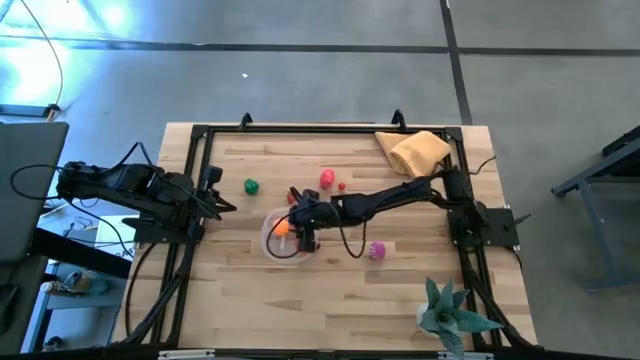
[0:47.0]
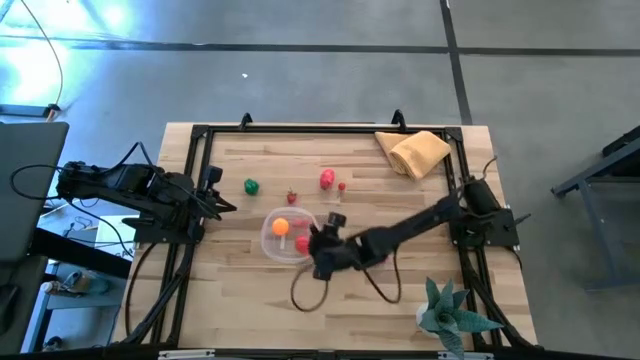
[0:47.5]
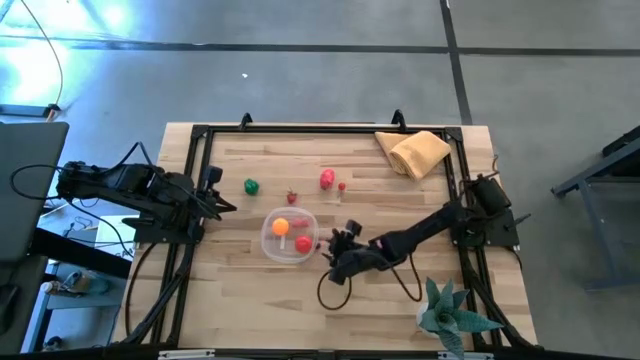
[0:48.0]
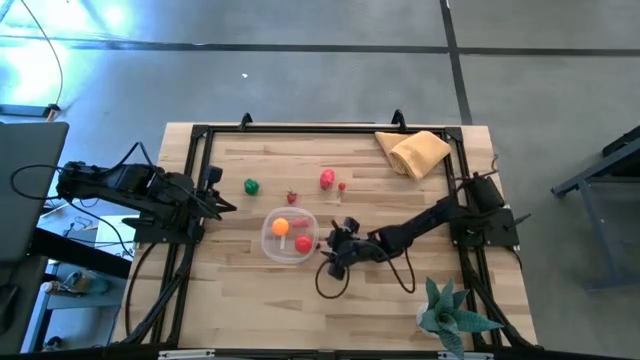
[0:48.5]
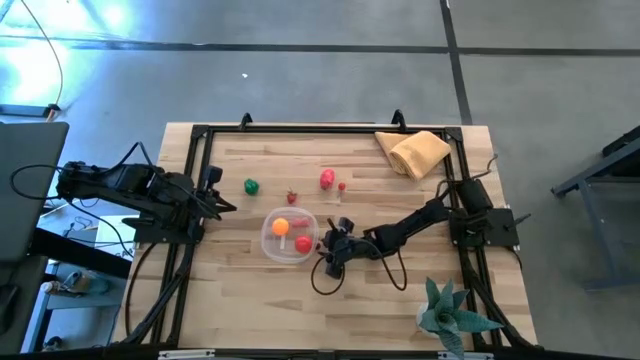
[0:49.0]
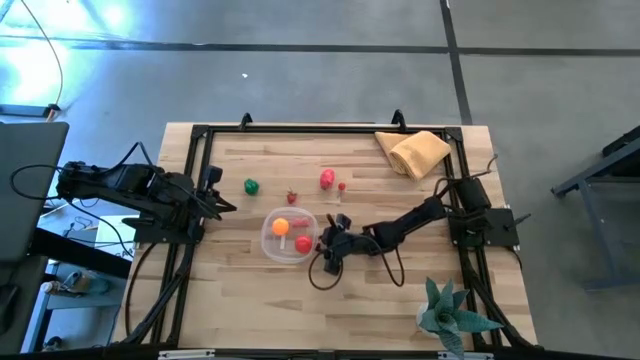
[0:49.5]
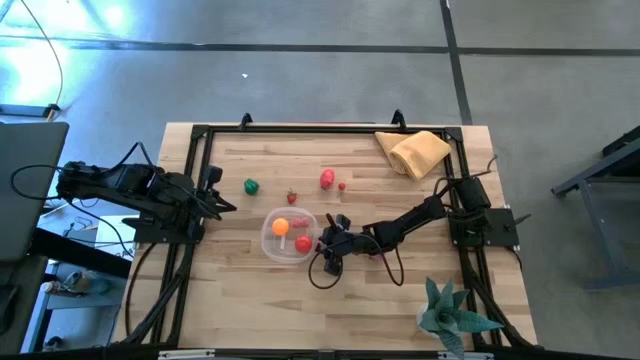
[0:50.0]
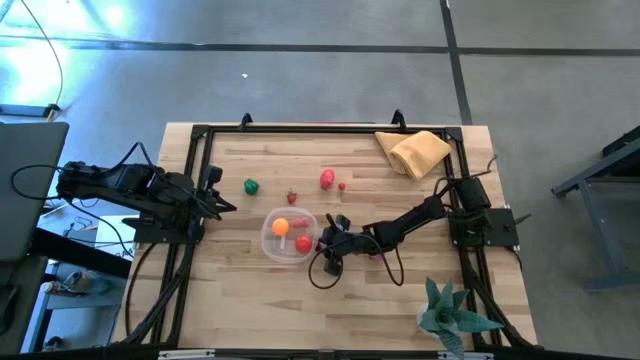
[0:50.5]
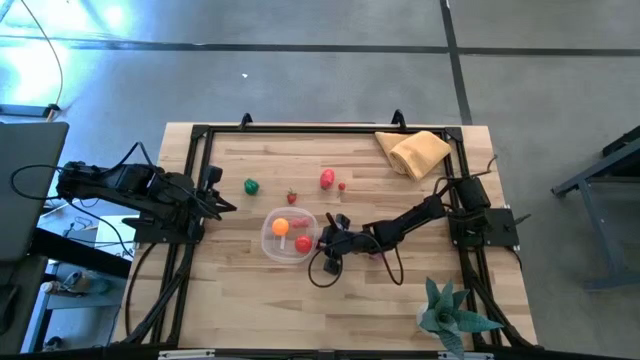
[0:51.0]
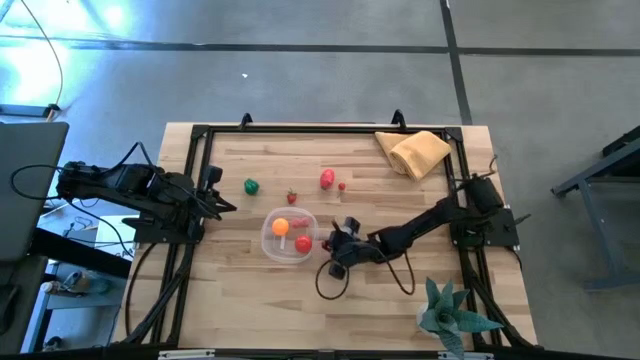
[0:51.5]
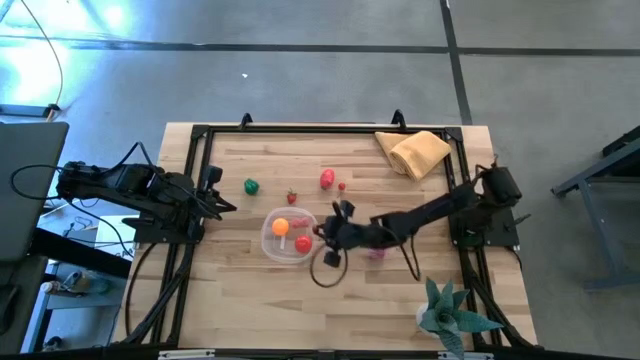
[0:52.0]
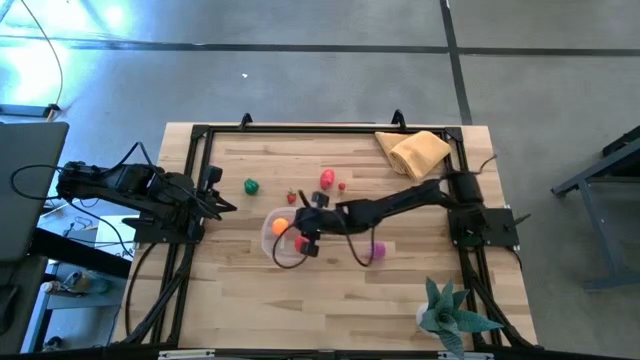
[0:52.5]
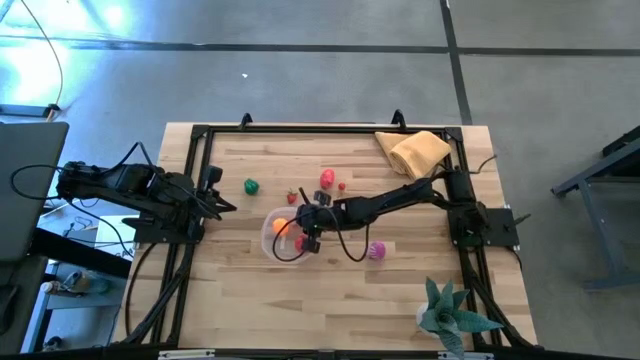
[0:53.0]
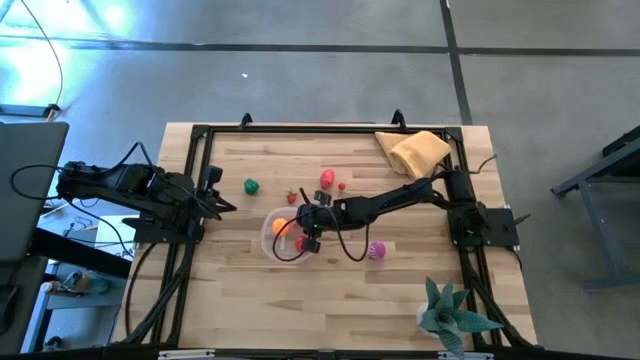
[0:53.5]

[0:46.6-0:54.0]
Task: Pick and placing Produce into tupperware
Put the bottom red cherry into the transparent container

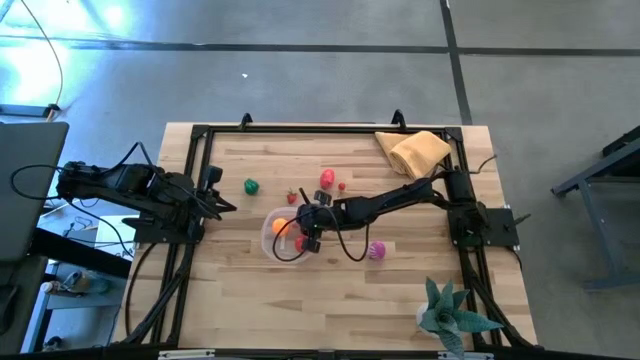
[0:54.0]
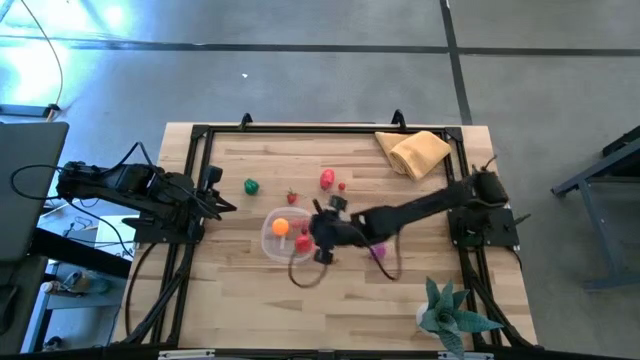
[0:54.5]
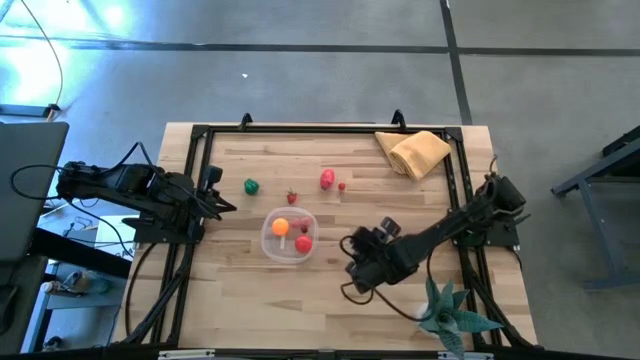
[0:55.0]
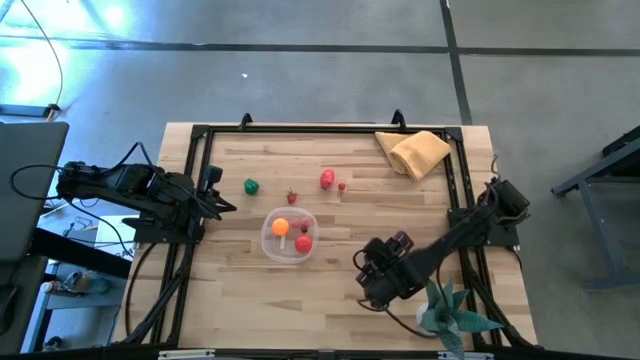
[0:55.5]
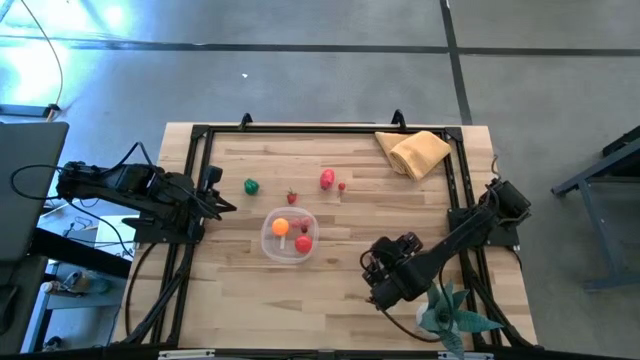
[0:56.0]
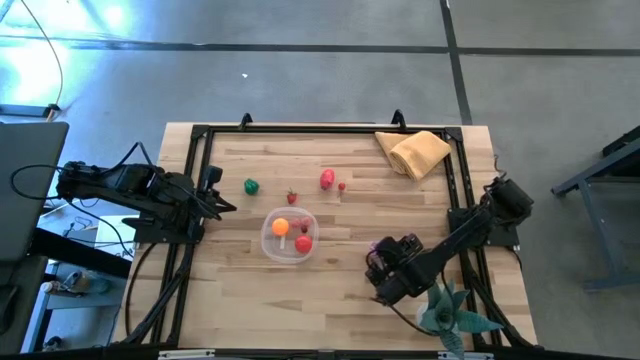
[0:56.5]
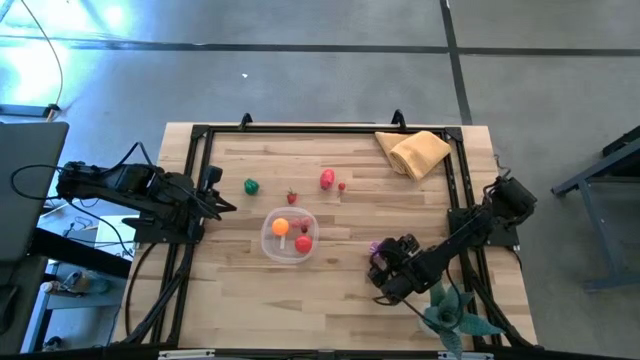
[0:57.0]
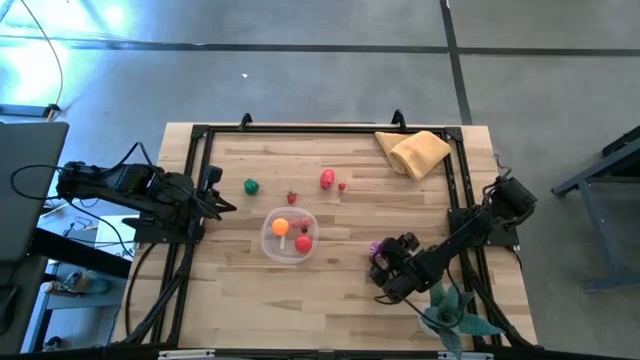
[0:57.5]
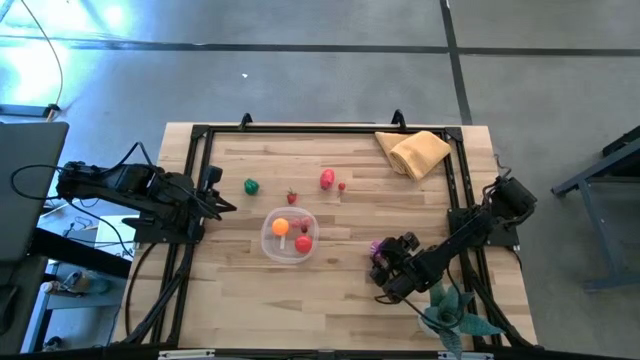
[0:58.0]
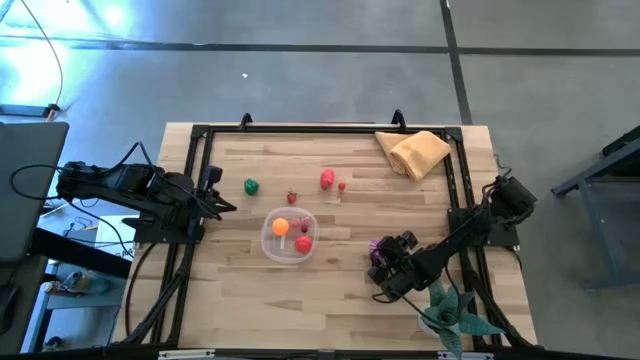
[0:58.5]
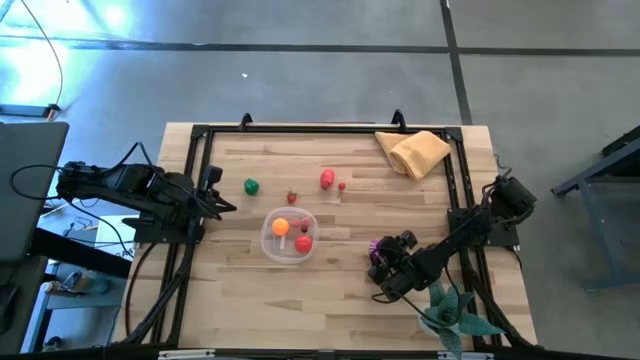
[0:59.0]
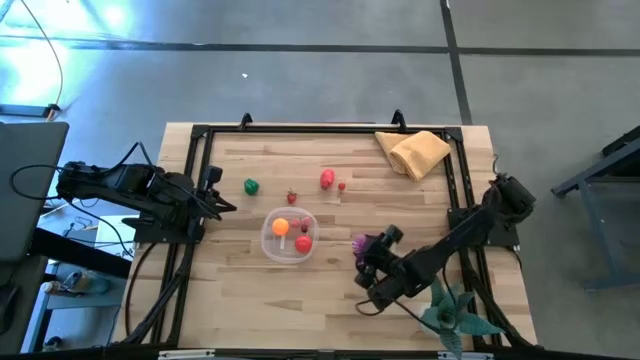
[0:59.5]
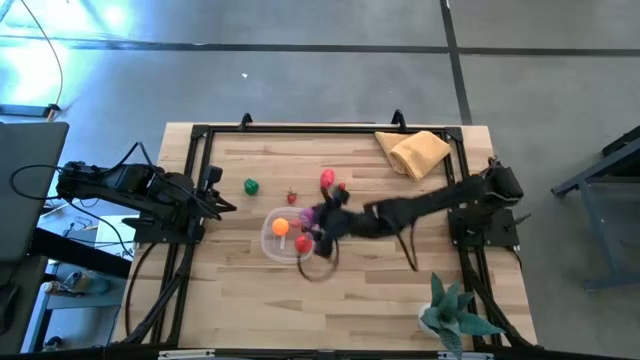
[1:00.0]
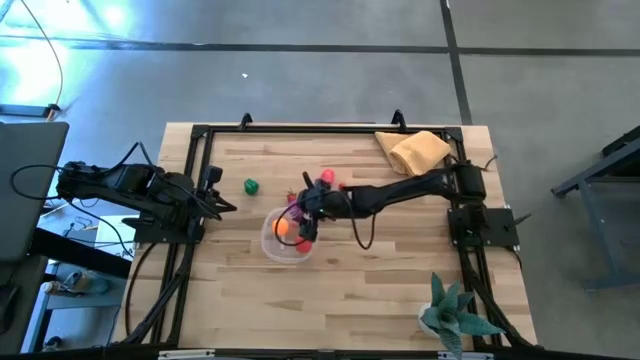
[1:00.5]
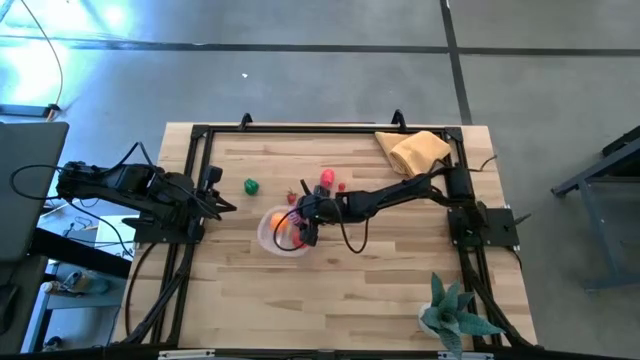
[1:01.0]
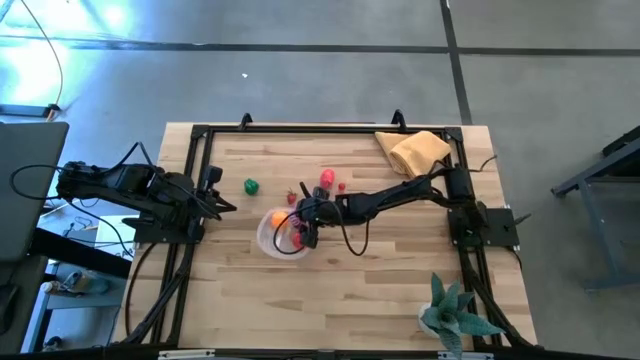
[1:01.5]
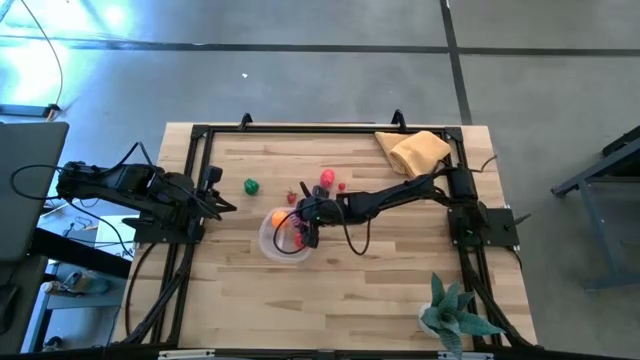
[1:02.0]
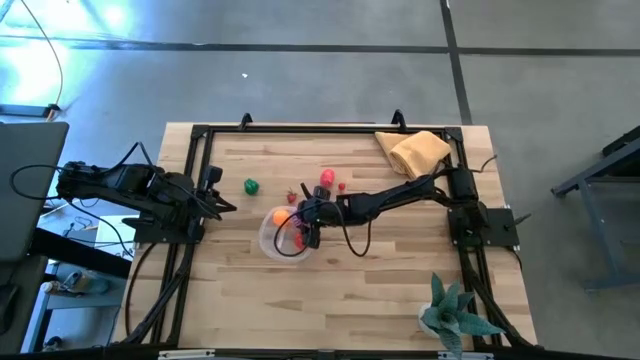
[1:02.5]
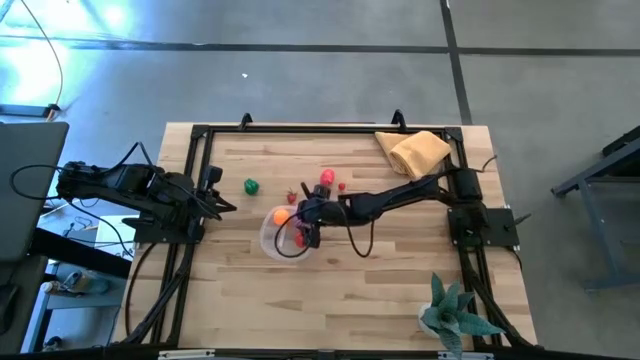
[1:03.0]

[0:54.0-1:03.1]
Put the onion into the transparent container

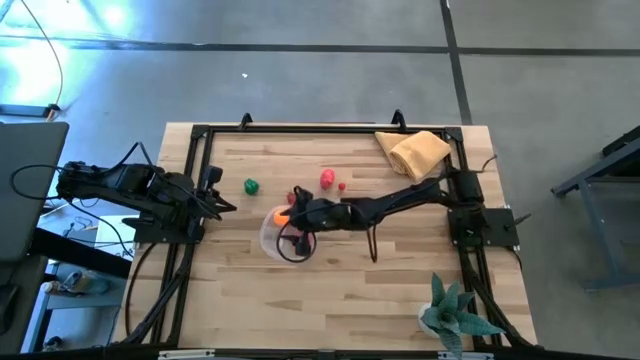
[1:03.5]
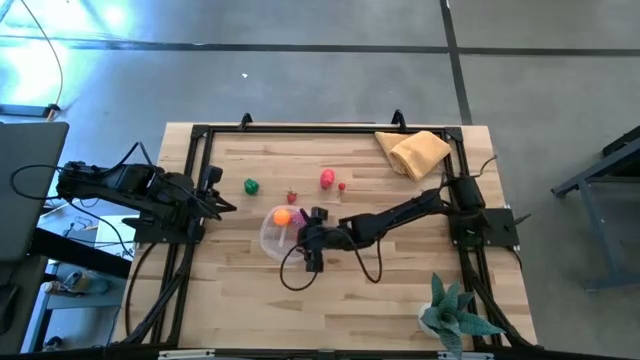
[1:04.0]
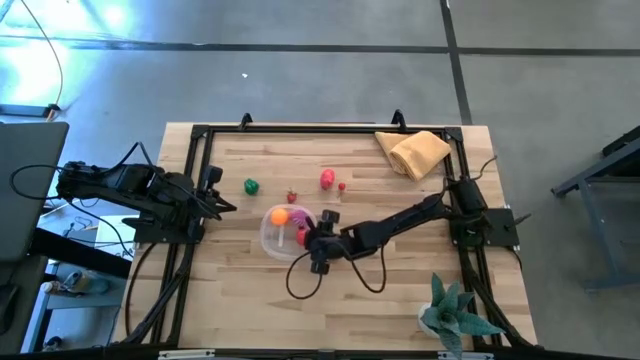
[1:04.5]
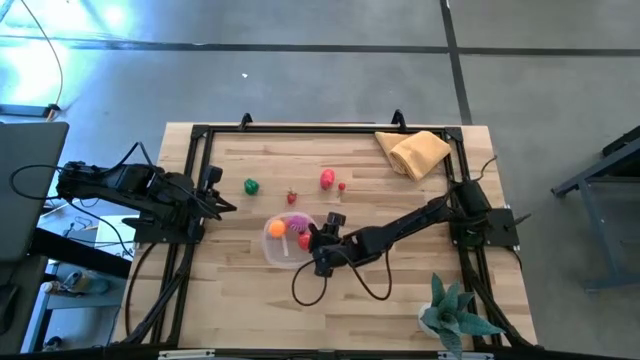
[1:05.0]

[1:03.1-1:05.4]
Adjust the transparent container on the table

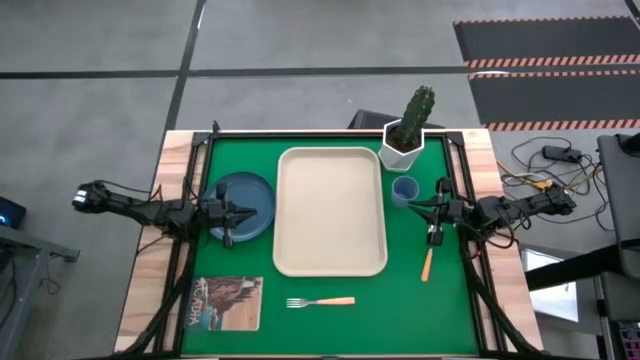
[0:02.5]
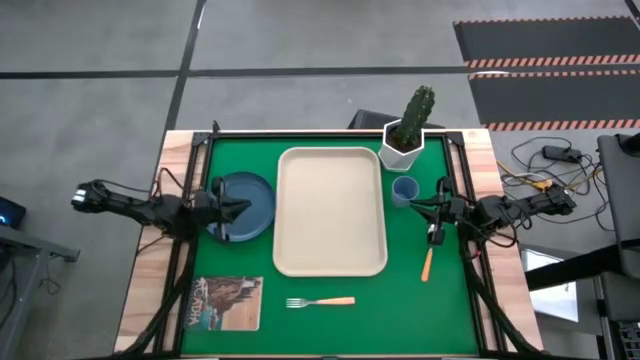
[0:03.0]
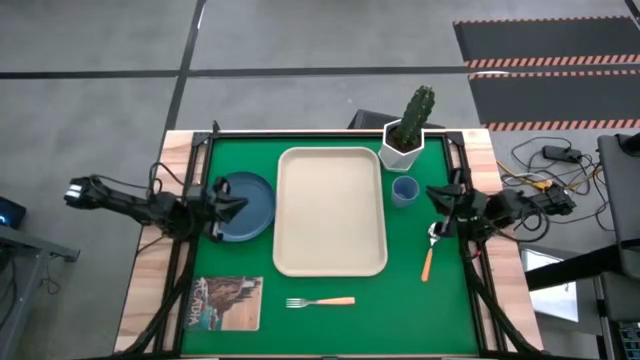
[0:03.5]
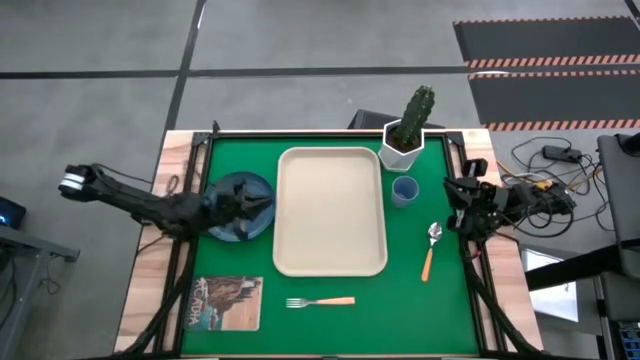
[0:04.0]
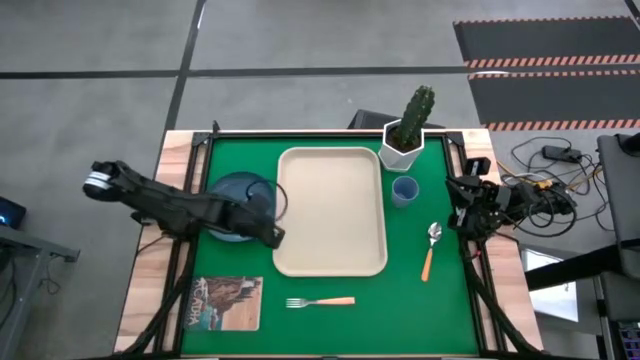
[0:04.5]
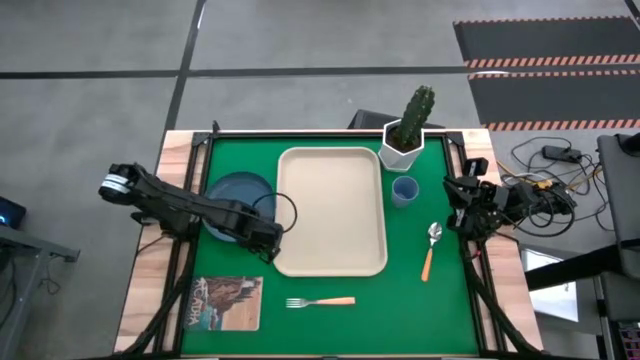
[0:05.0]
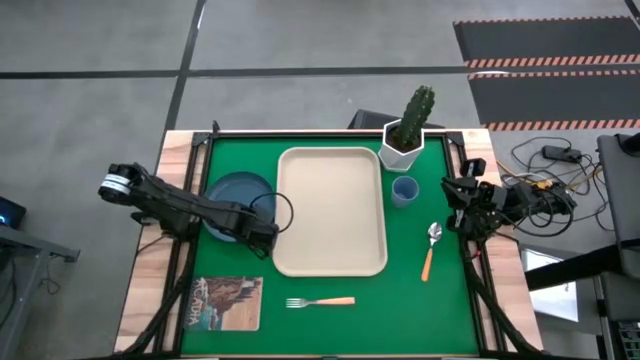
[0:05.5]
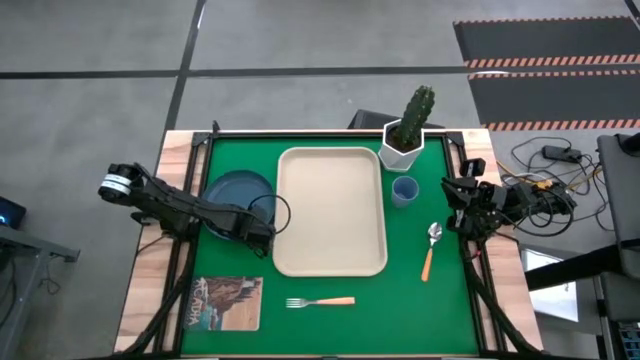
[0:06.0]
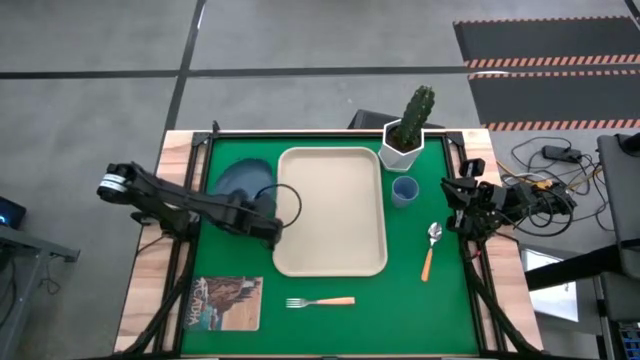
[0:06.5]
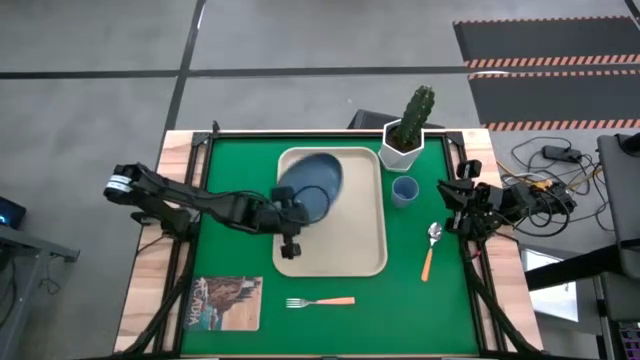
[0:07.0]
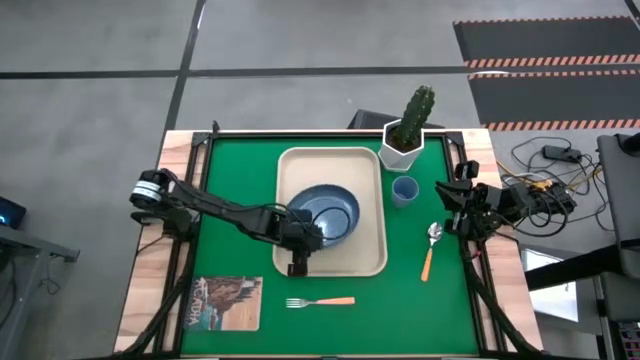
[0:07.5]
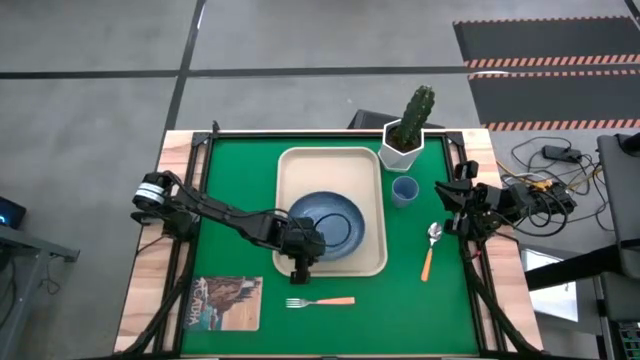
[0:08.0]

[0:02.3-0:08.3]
Task: Pick and place plate/cup/fork/spoon on tray
Put the plate on the tray
